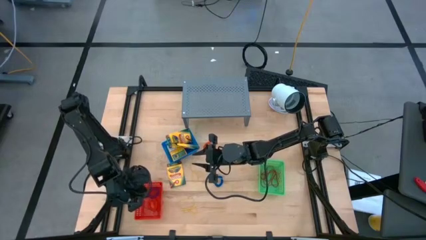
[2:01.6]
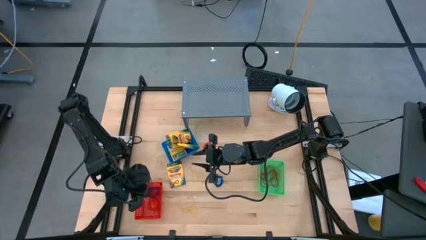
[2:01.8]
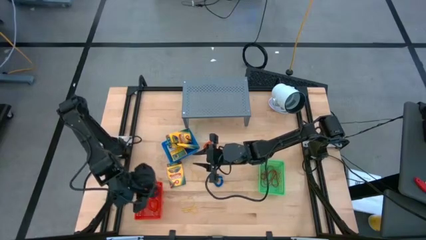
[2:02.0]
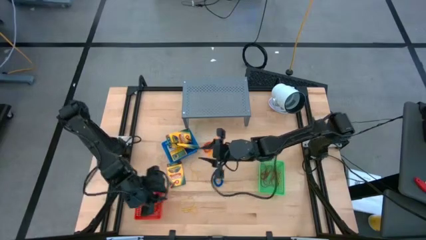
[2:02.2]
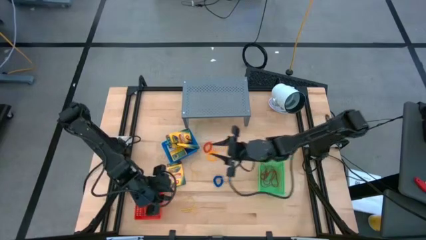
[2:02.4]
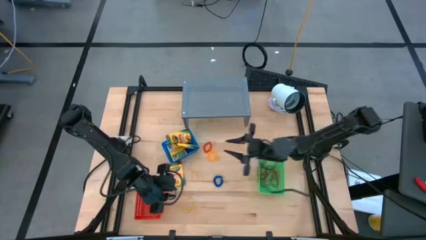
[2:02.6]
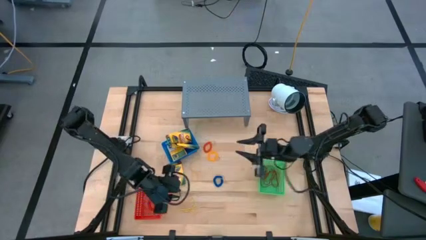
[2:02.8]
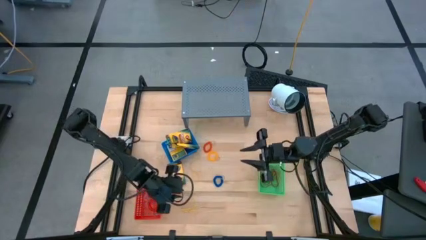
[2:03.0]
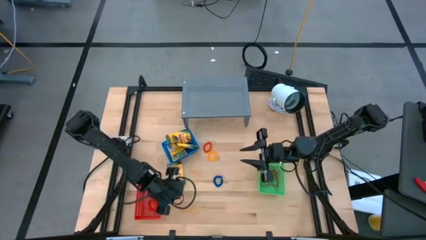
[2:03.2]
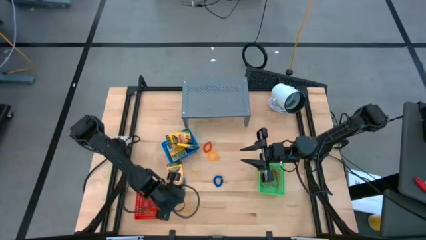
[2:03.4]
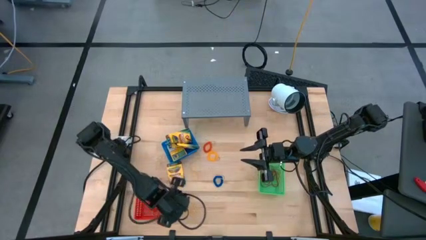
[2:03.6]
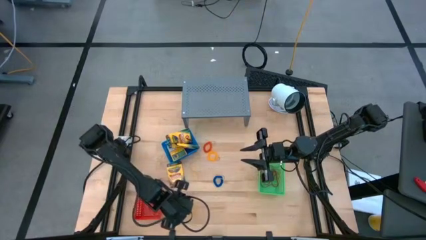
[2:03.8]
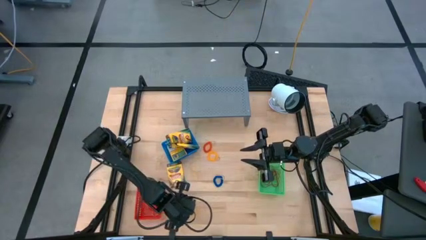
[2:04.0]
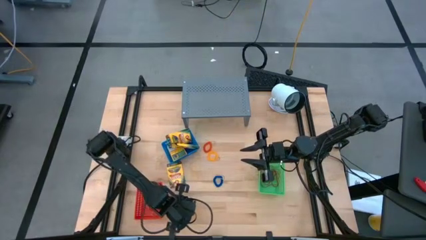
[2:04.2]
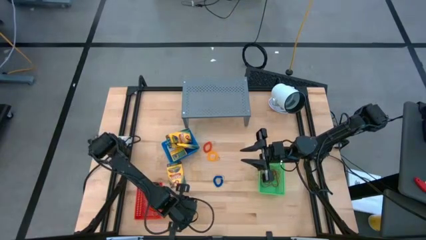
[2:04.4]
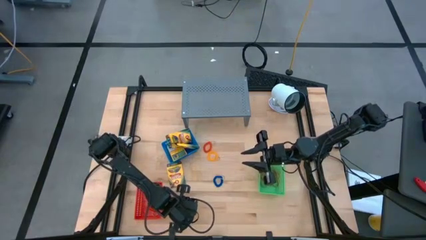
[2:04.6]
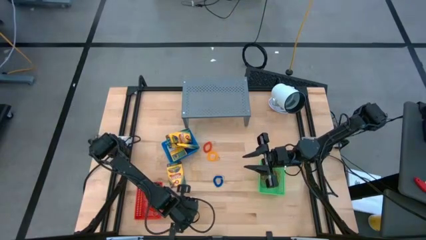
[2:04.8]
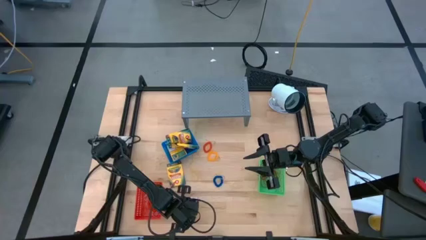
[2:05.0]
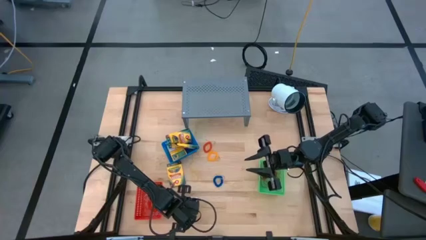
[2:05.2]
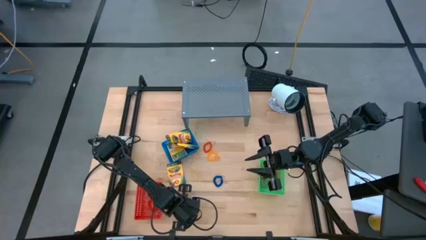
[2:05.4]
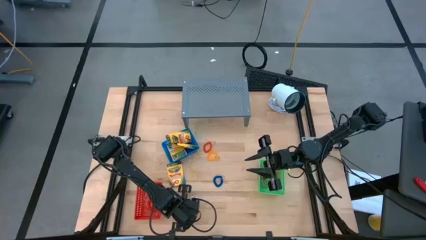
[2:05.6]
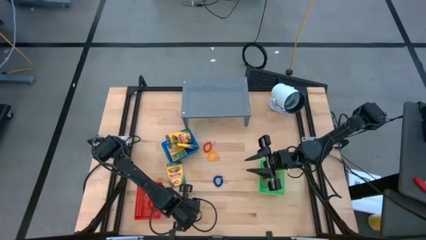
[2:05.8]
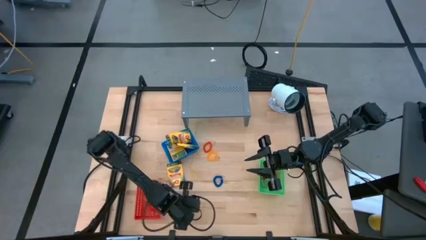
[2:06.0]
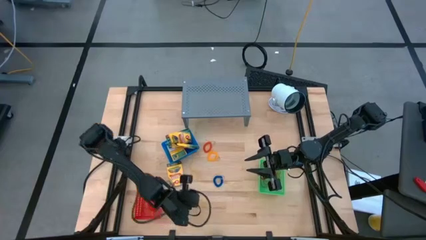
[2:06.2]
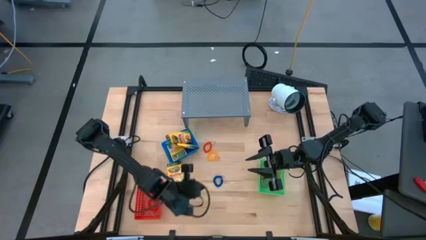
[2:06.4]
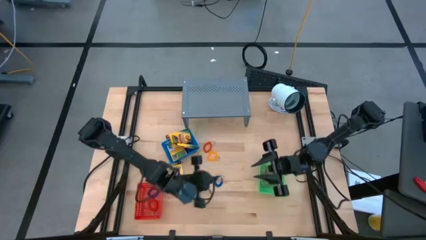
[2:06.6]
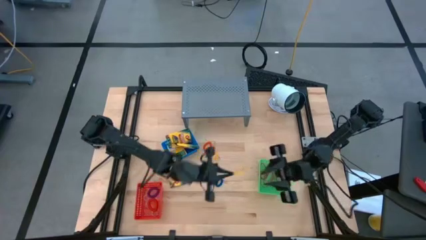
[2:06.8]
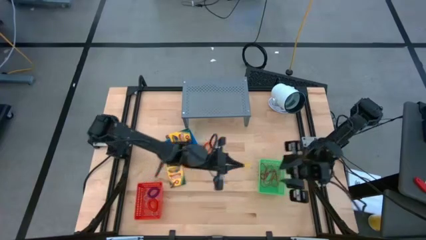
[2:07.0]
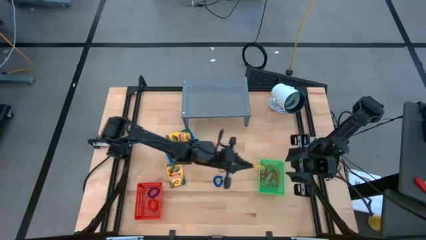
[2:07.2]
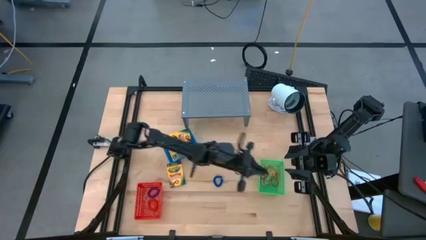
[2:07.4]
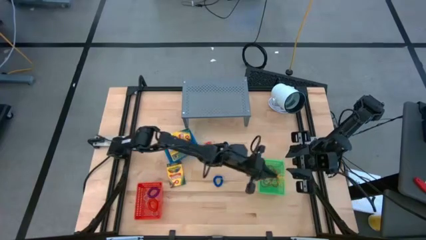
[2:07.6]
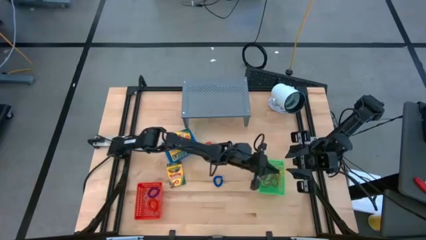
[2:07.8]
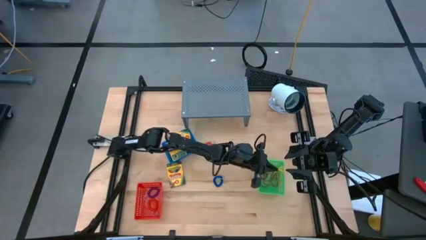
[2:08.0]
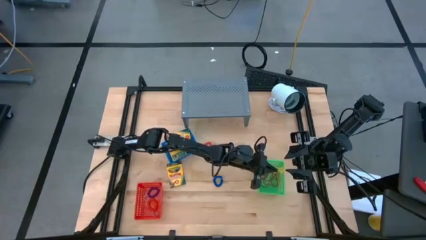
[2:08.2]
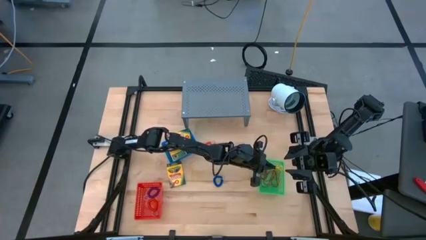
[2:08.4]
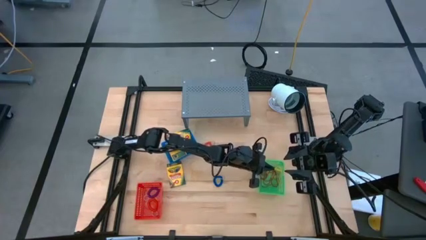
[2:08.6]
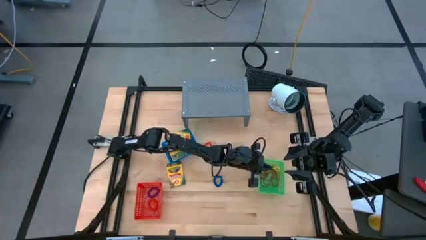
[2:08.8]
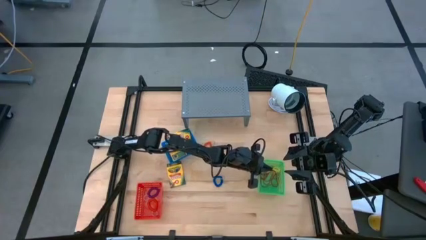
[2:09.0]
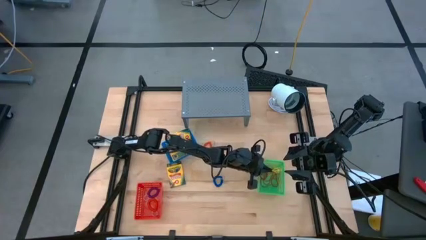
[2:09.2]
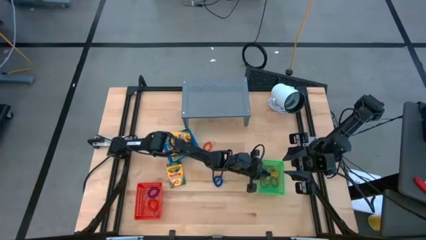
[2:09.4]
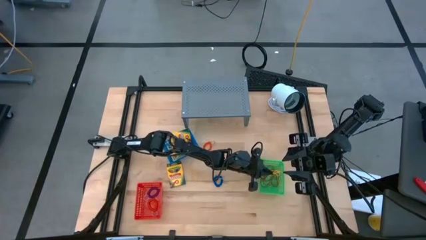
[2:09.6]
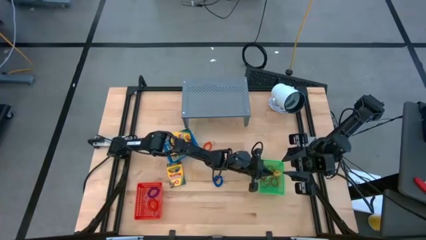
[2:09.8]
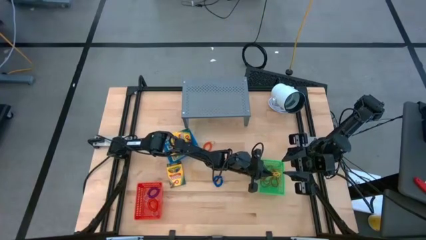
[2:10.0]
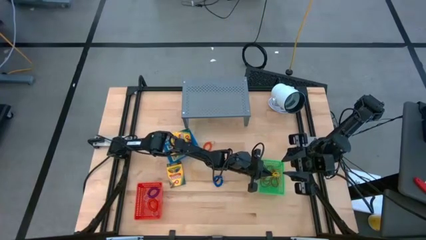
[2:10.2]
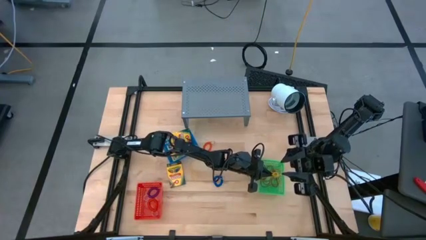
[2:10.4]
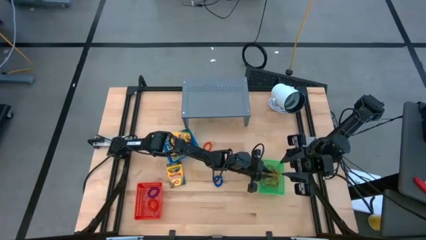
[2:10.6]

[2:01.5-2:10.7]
Task: Pick & Place Office Desk Supplies
Put the yellow rubber band into the green bin

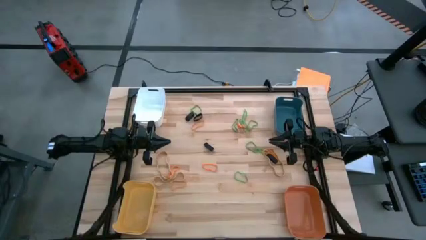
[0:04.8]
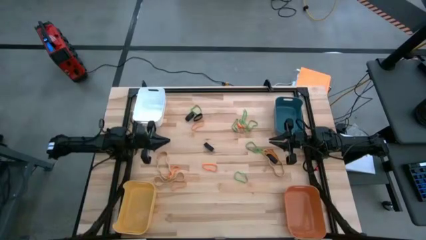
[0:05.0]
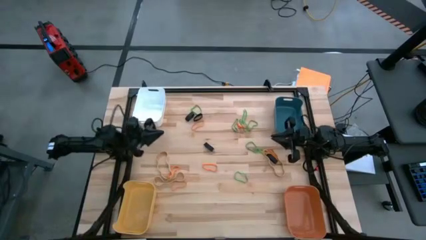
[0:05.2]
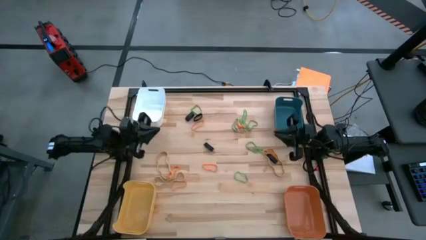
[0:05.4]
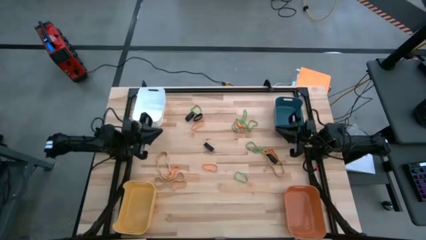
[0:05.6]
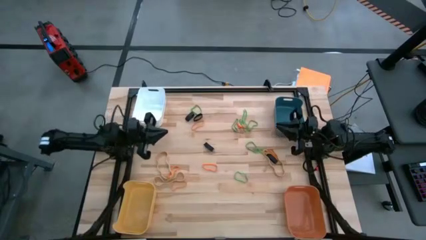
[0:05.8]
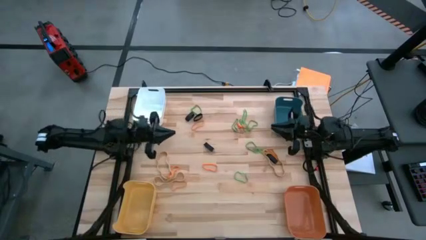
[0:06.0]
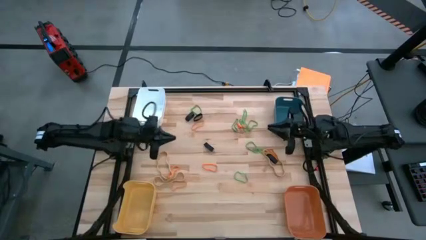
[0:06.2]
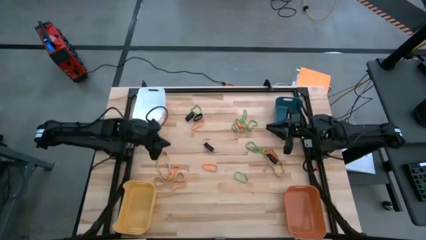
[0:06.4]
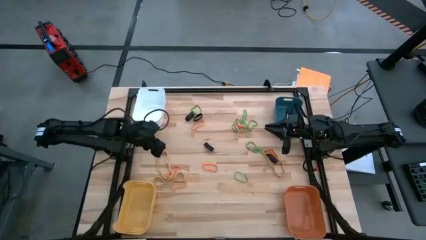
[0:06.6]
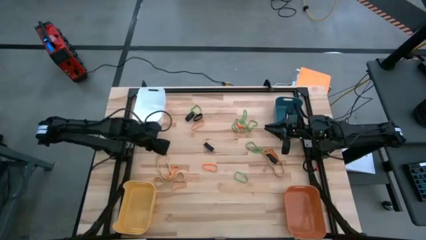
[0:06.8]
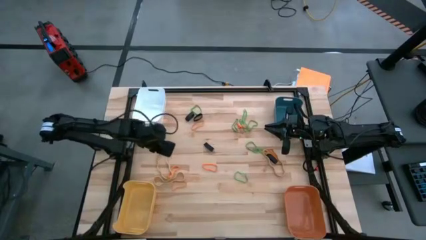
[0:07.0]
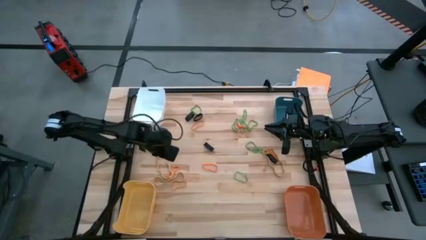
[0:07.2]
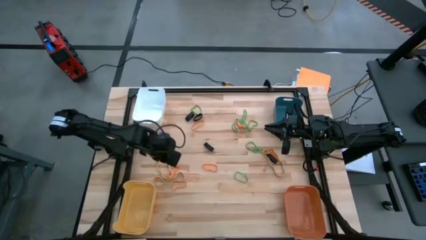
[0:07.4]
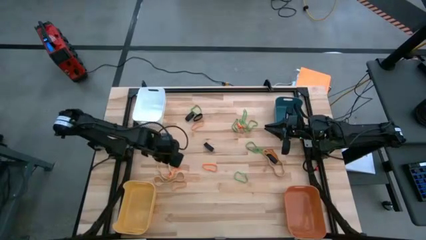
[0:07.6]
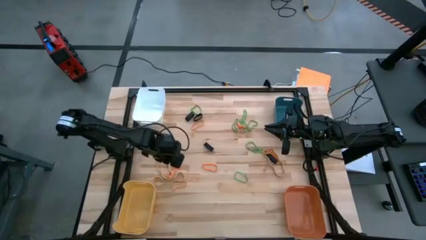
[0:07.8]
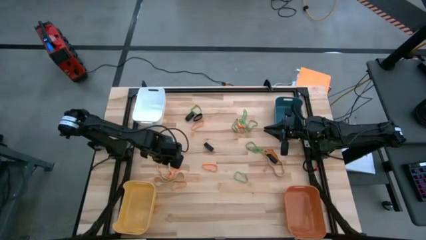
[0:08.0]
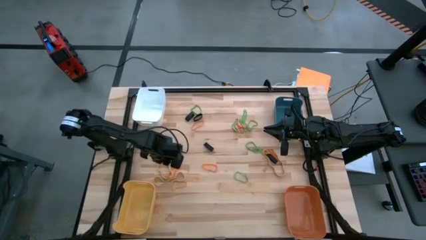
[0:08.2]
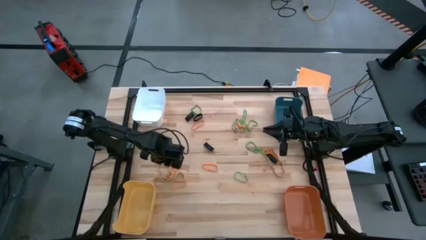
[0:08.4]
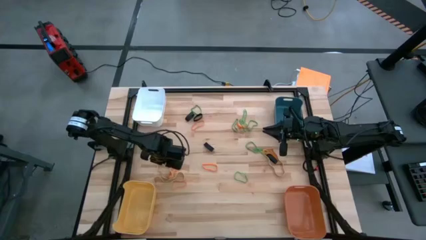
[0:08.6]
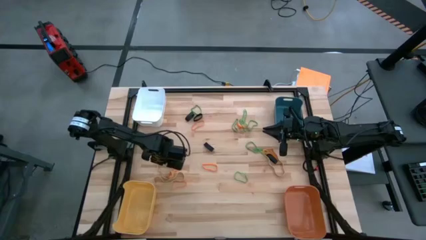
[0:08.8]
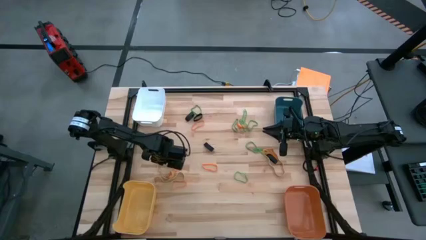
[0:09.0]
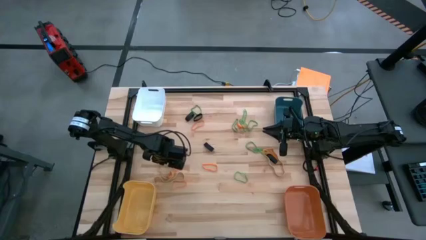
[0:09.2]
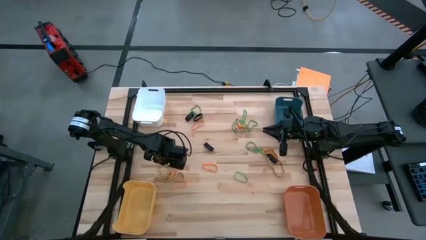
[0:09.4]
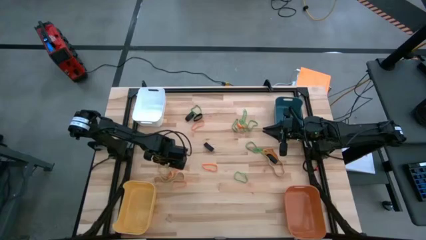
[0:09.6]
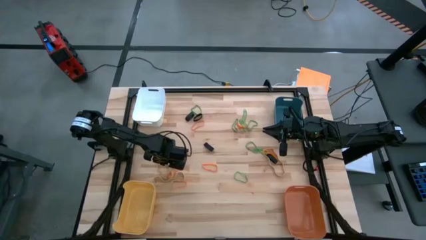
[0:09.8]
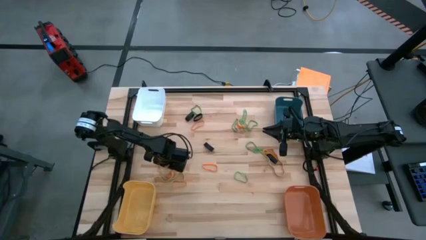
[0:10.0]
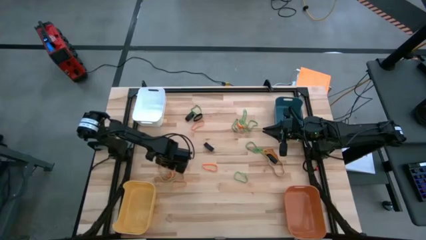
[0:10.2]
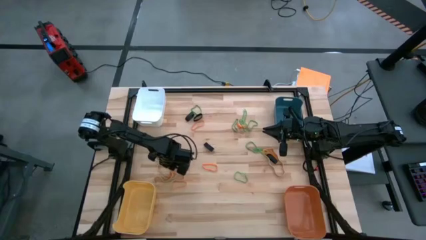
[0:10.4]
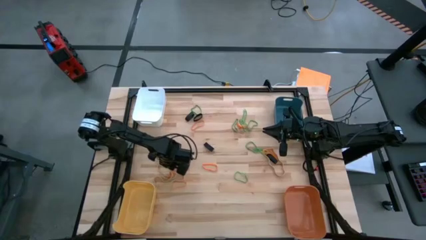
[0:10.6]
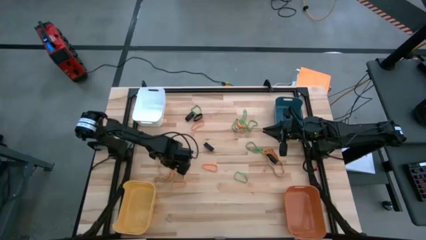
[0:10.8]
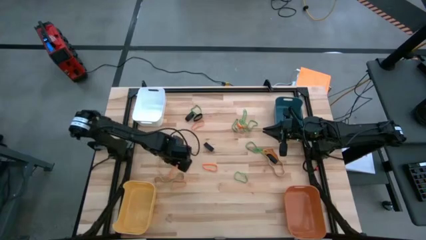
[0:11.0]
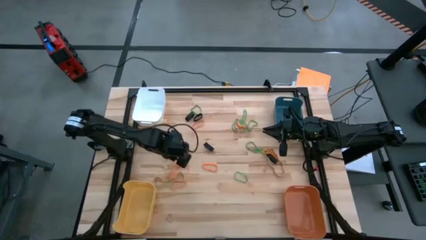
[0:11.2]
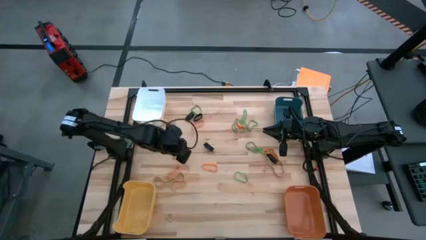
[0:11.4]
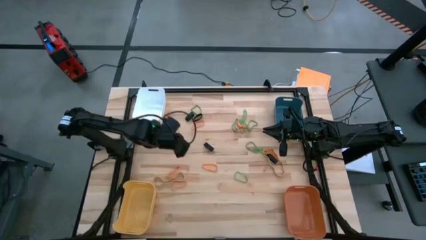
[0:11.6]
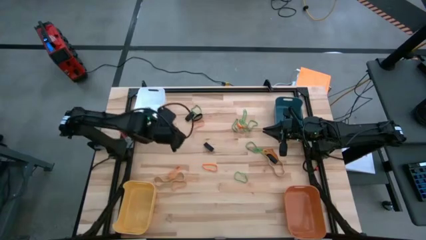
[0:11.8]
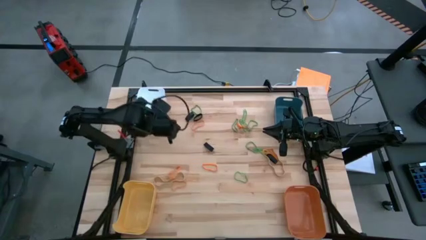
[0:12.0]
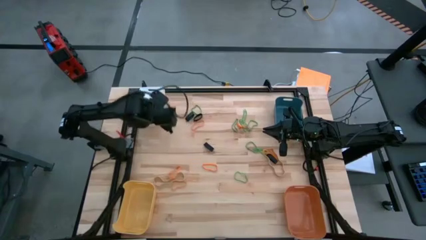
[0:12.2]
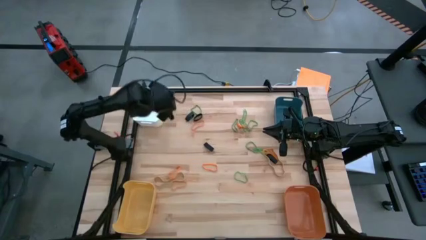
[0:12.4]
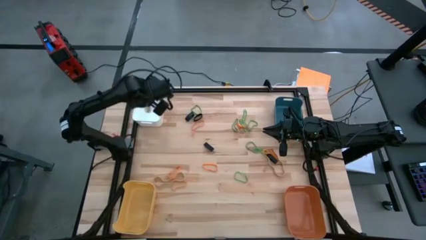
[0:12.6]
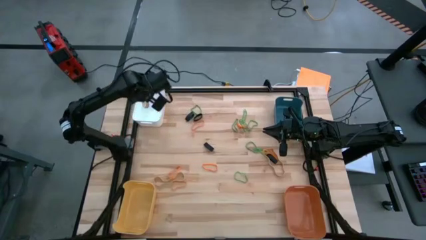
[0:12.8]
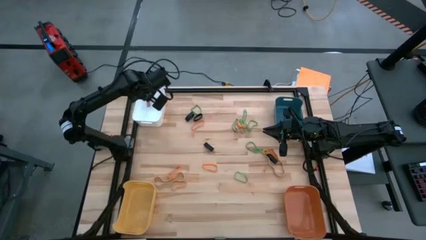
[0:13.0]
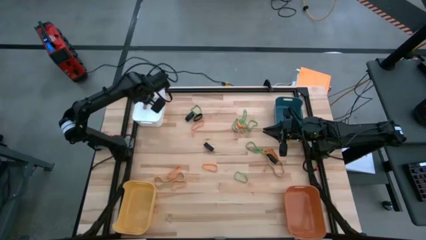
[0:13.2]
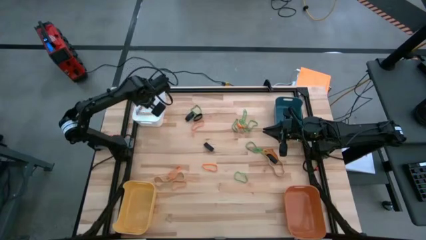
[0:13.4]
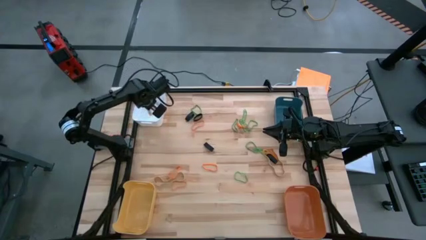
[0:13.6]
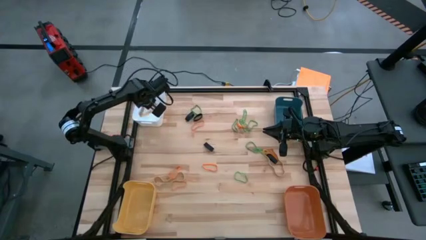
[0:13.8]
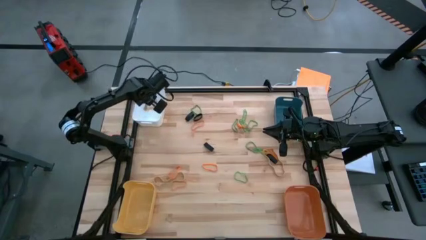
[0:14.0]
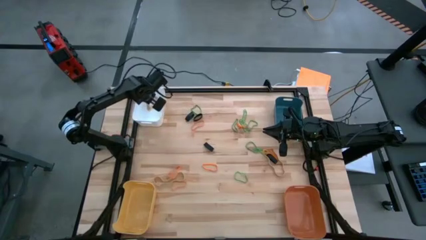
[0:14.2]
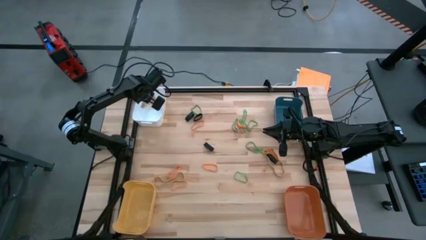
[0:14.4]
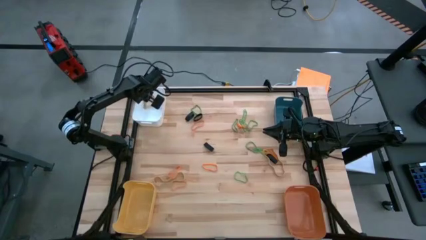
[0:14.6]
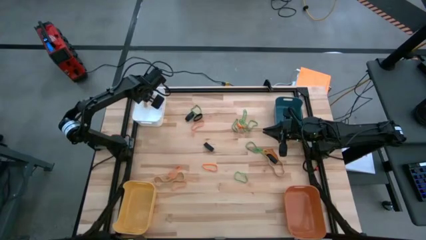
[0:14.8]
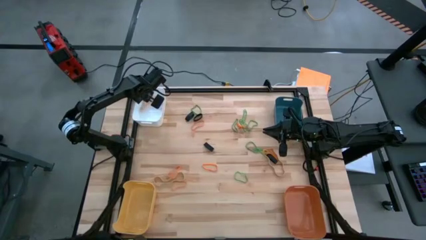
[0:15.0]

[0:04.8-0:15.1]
Task: Sort rubber bands into baskets
Put the brown rubber band into the white bin
